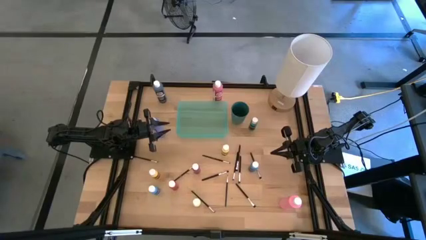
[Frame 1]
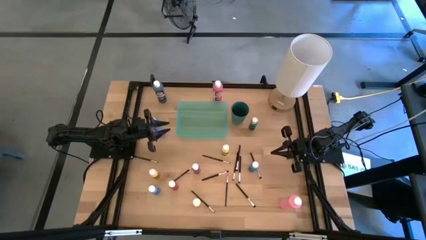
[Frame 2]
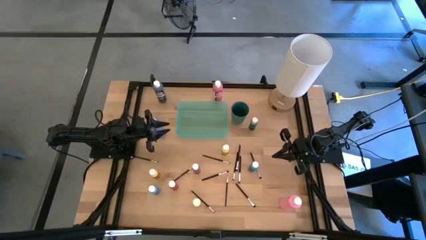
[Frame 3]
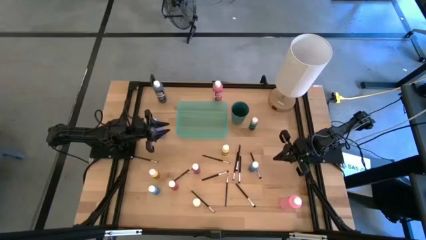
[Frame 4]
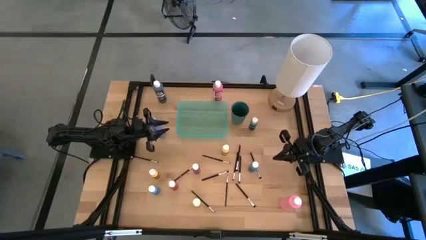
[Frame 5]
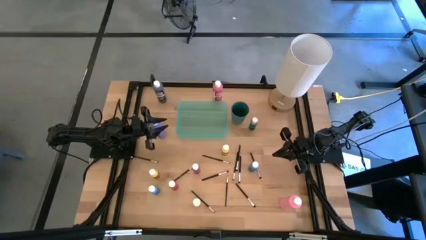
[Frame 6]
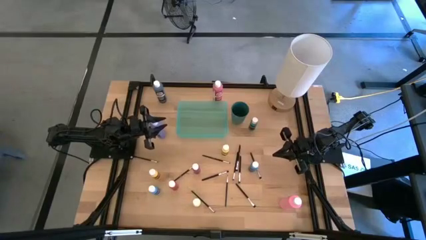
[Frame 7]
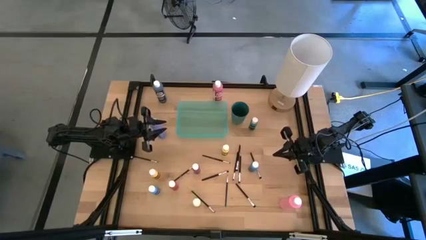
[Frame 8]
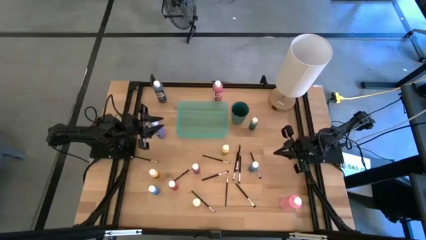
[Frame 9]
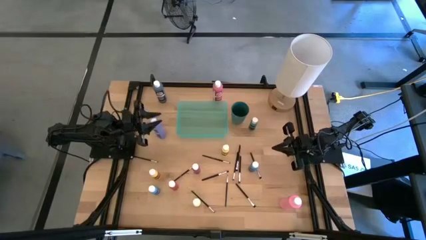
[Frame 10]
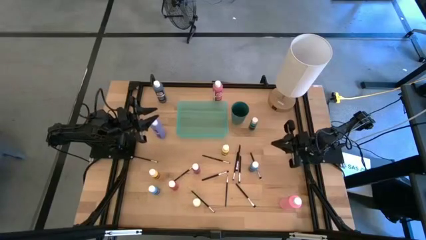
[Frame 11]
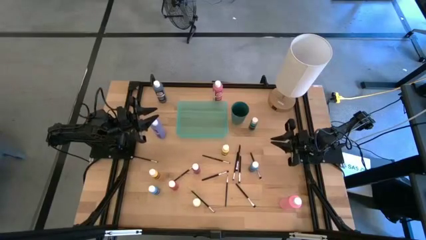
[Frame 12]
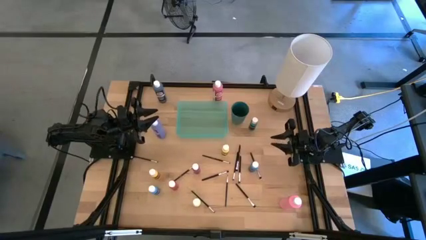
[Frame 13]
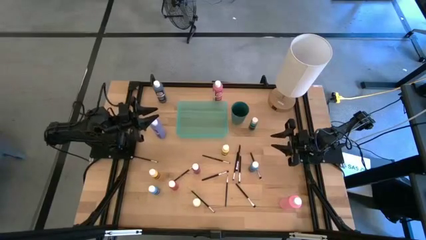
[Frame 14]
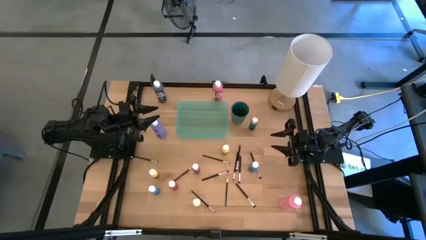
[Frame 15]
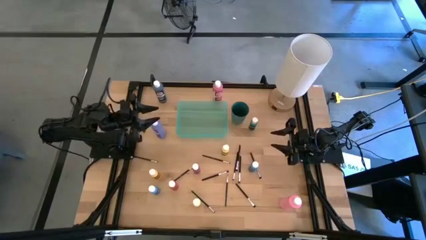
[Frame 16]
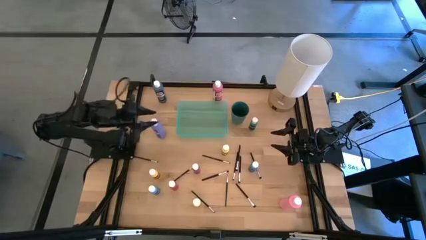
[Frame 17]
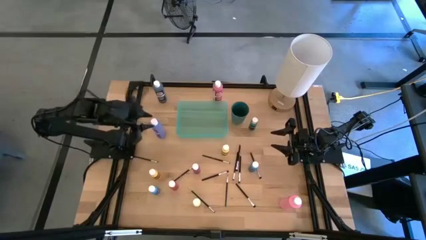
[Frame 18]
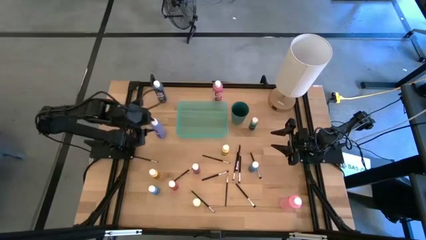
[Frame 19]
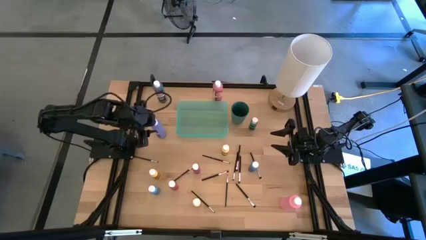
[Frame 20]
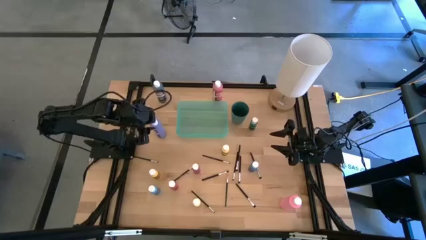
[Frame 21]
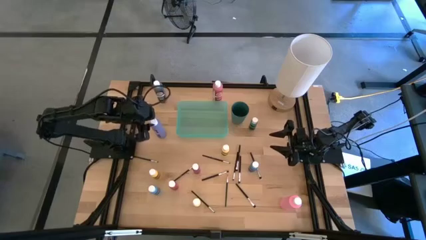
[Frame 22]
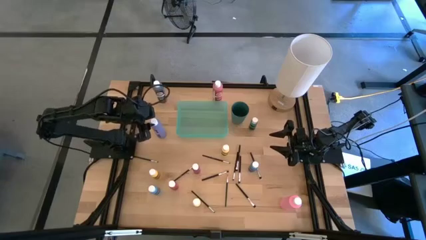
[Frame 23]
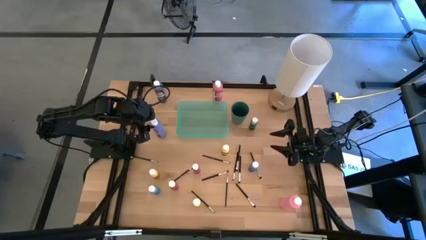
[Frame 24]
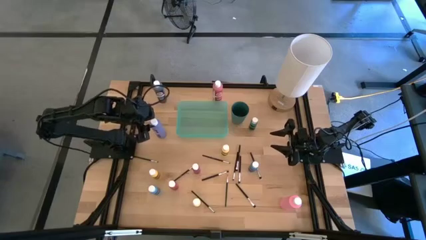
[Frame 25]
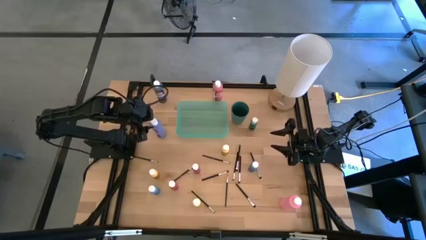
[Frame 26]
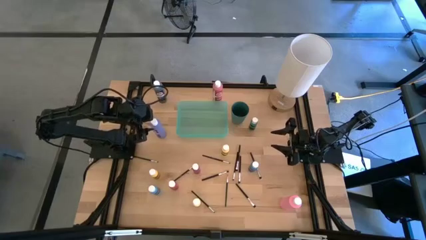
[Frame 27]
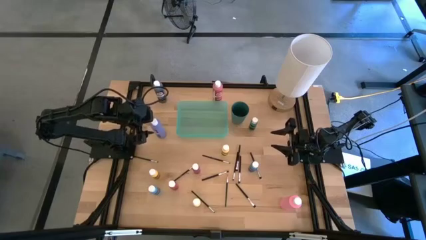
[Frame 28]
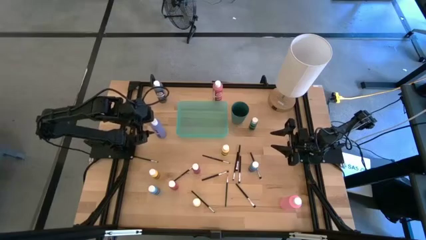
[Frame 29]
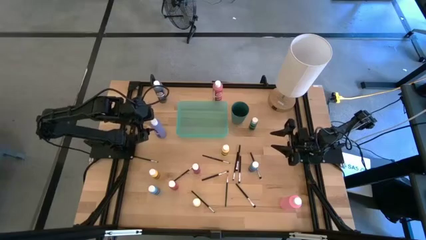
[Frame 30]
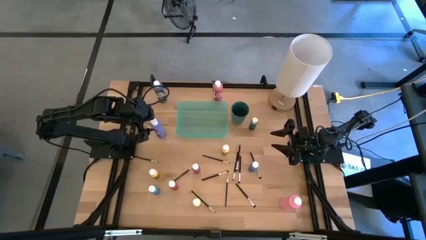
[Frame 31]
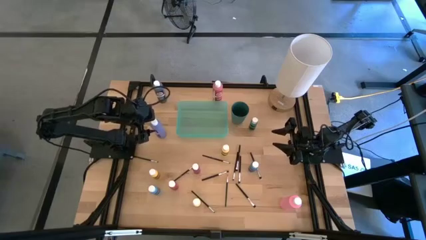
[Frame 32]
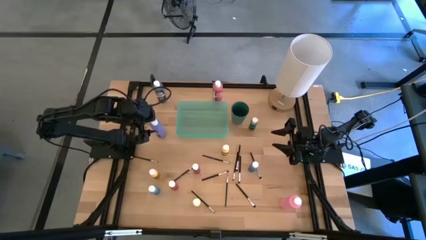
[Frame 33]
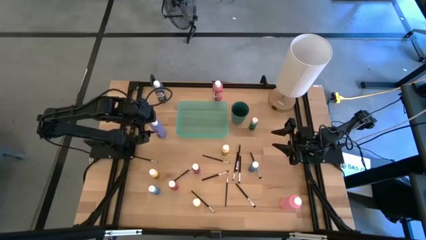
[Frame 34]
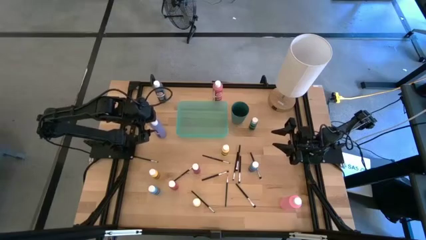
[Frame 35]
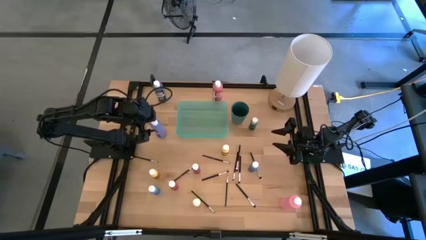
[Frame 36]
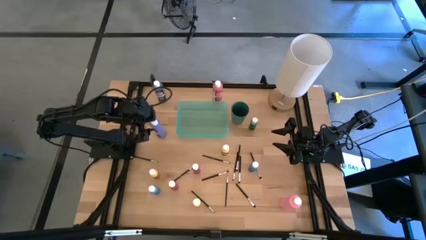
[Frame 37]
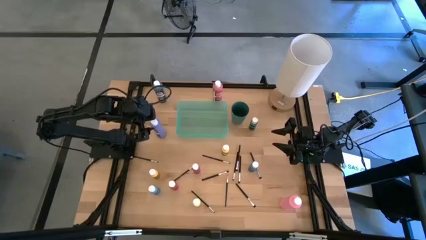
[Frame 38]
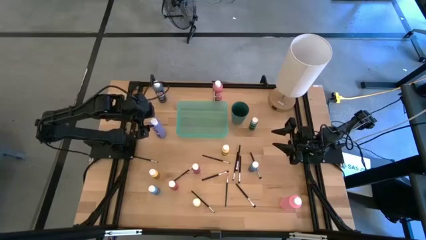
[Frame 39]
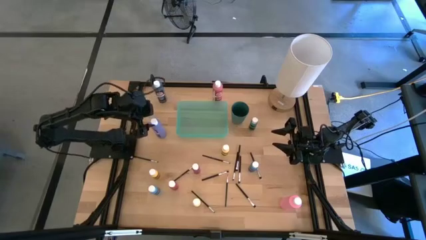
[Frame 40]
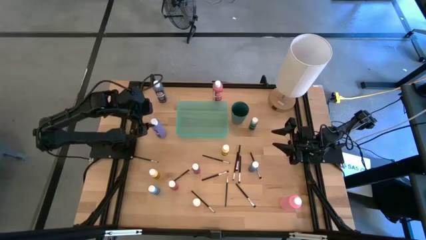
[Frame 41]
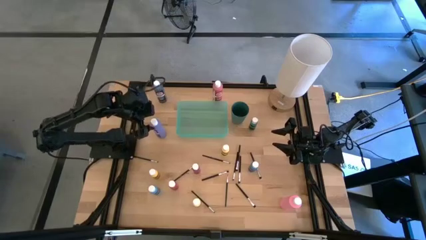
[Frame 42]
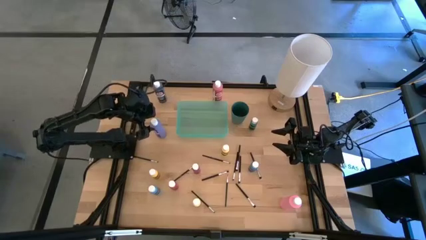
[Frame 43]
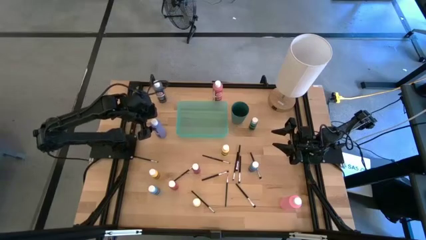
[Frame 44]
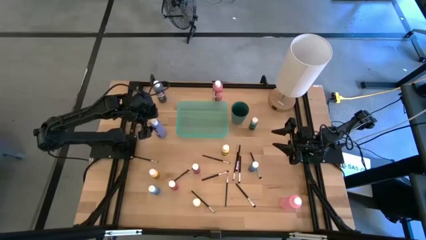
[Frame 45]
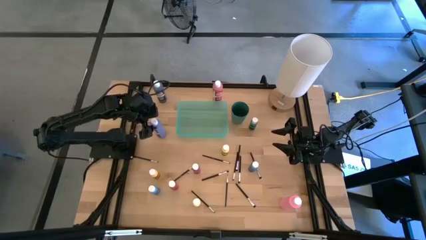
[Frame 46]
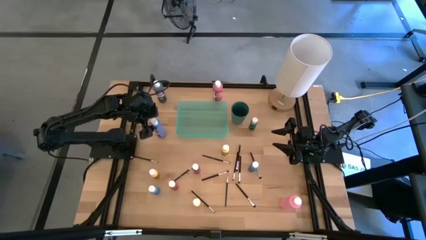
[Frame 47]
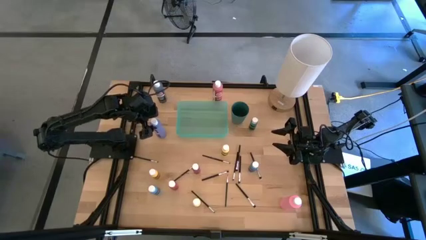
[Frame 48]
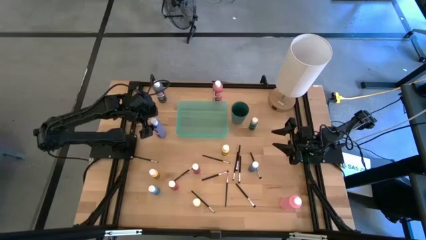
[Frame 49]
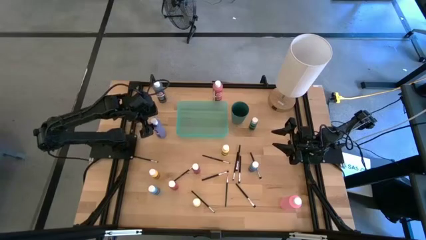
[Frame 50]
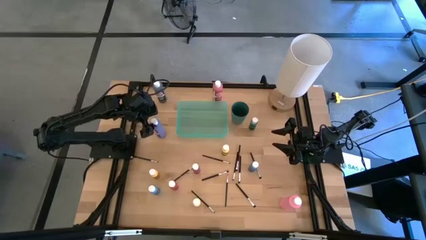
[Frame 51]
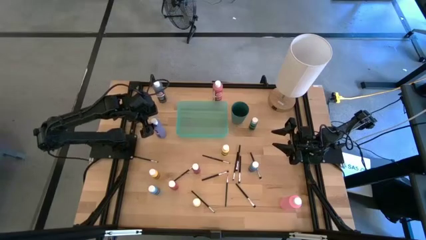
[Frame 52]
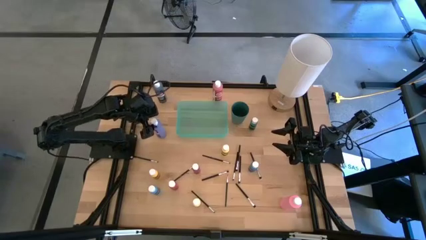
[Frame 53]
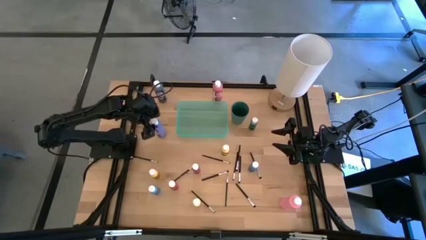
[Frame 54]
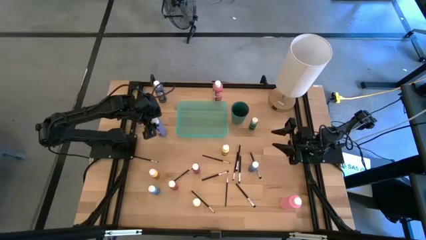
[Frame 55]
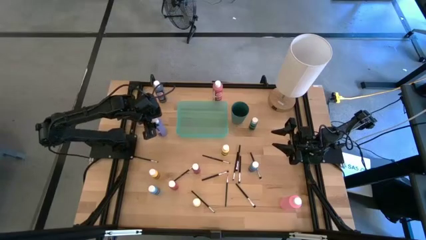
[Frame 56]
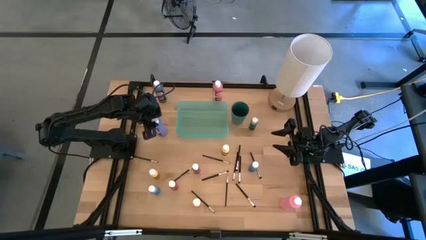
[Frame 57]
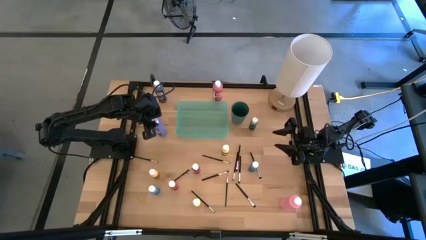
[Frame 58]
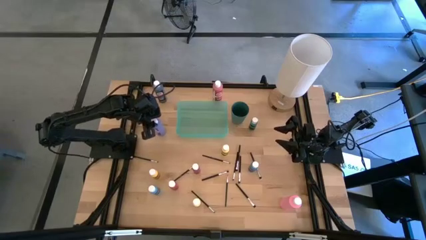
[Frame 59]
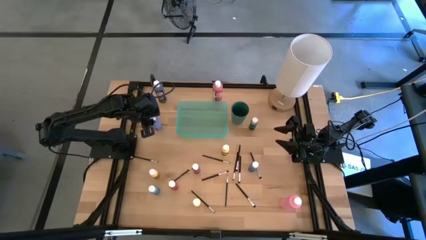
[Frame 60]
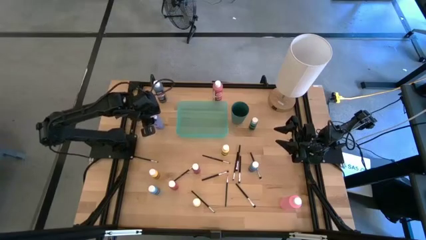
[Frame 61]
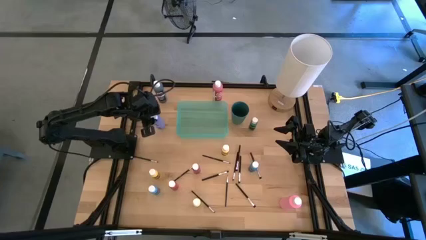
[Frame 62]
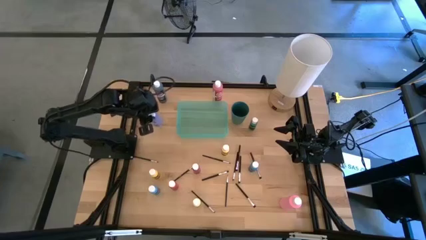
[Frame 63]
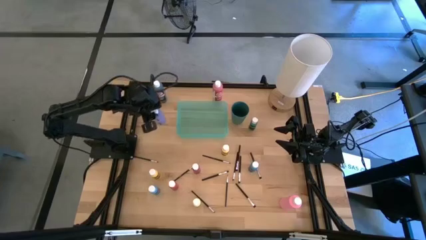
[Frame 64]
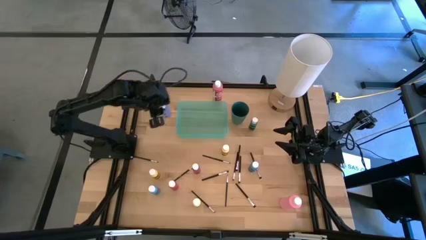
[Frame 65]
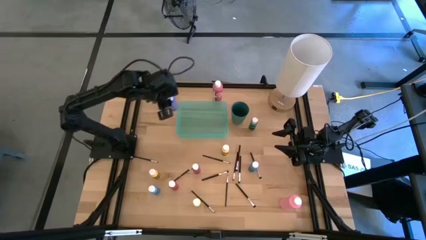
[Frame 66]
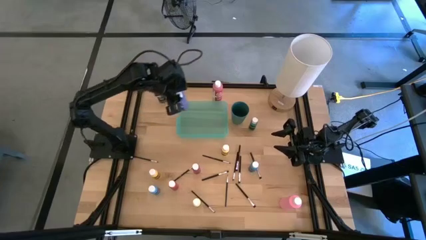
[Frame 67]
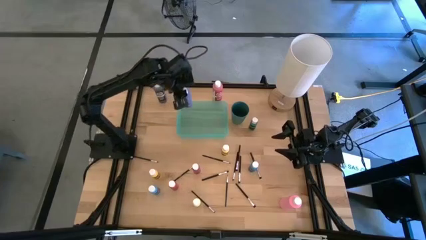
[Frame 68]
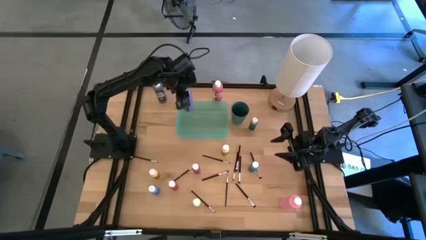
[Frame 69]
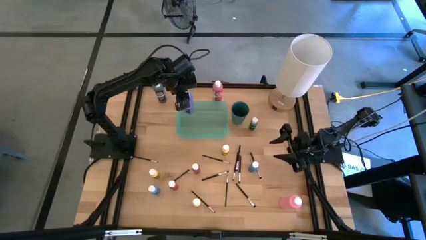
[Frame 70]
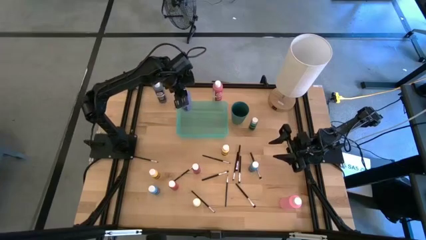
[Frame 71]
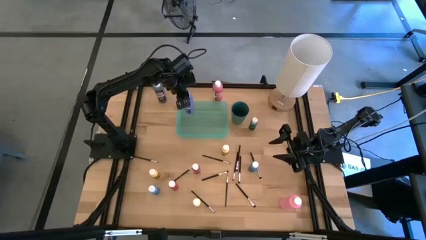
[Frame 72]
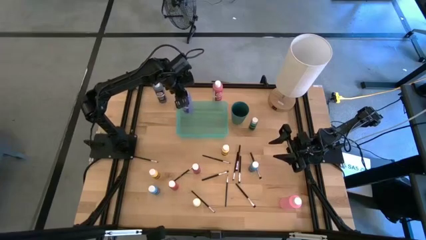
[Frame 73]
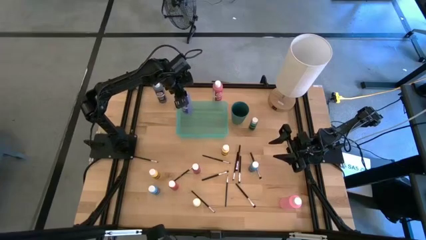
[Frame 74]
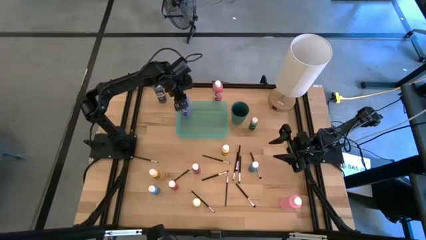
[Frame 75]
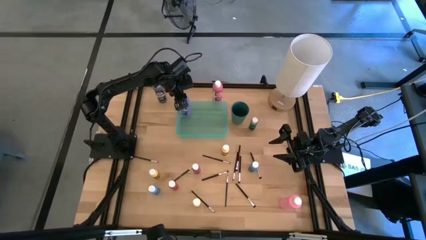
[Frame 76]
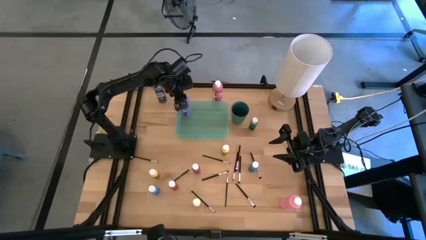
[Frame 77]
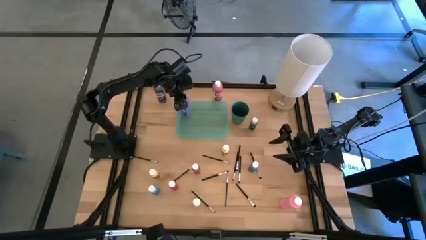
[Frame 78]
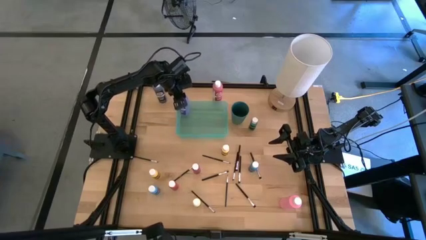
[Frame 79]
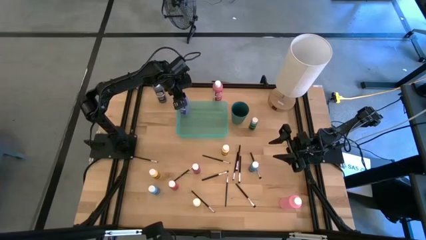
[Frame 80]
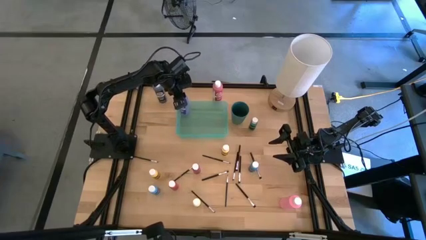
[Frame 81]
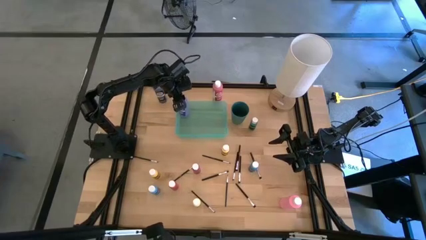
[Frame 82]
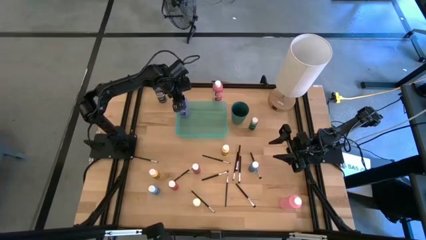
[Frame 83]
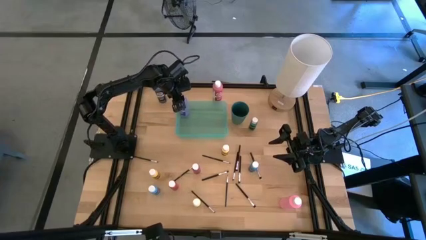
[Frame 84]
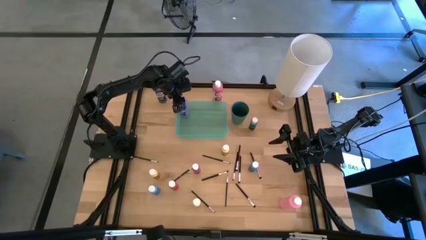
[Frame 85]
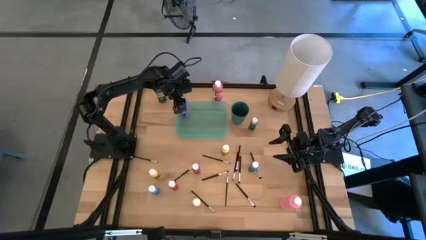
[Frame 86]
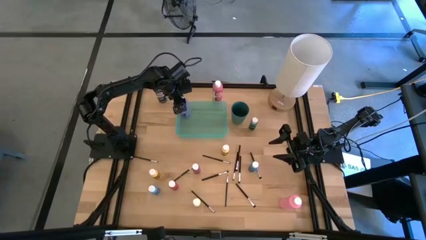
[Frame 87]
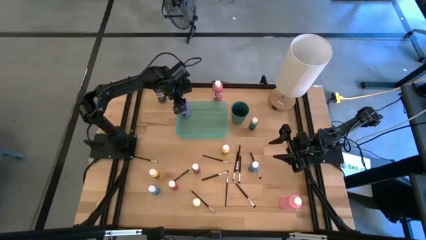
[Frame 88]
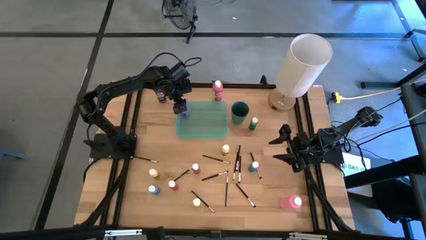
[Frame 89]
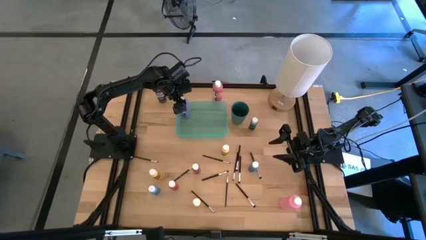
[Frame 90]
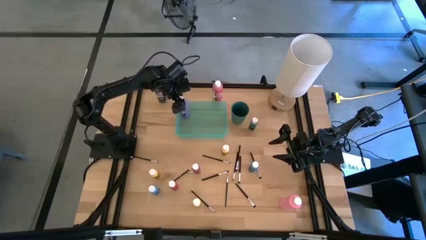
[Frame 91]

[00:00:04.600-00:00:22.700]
Task: Pick & Place Paint Supplies
Put the big light blue paint bottle into the green bin
